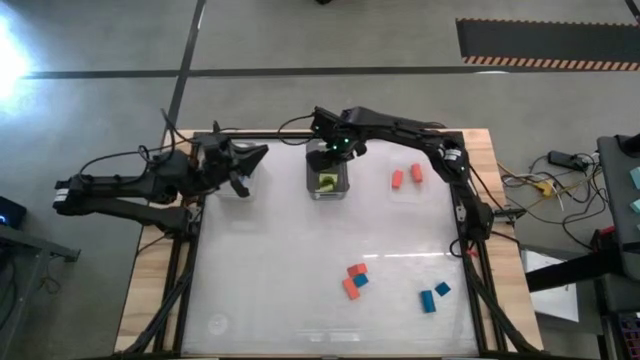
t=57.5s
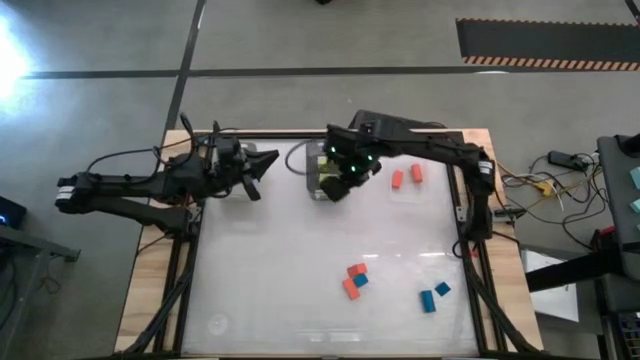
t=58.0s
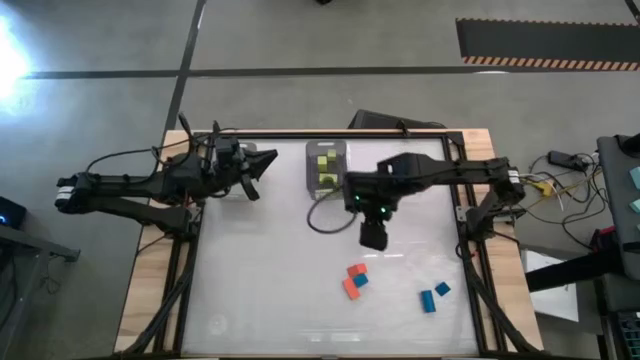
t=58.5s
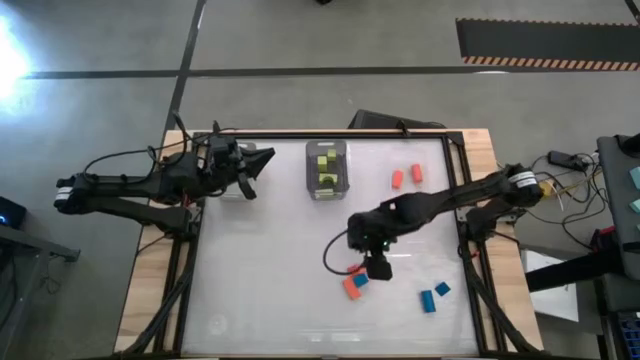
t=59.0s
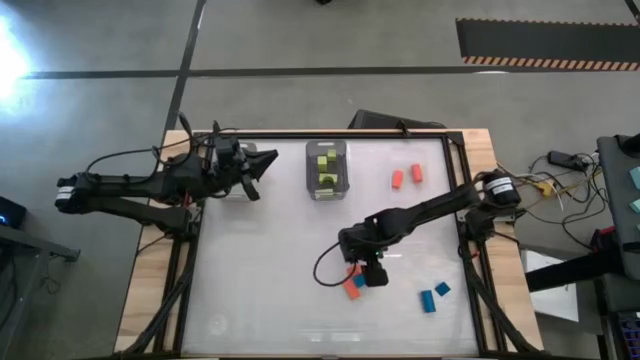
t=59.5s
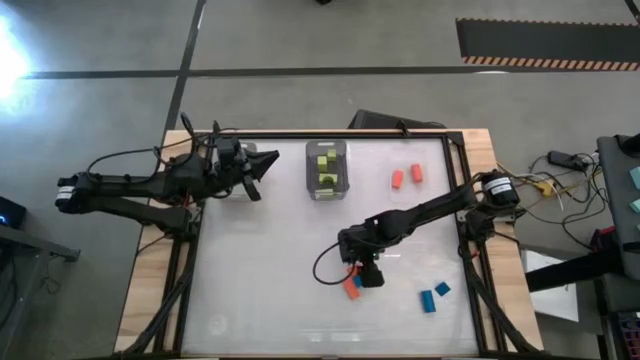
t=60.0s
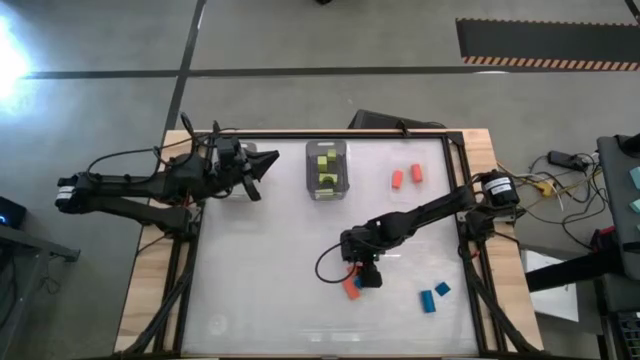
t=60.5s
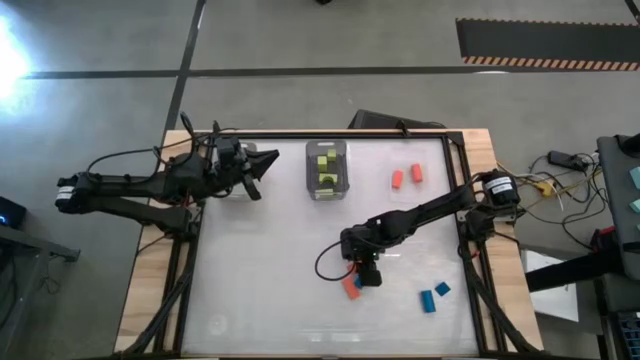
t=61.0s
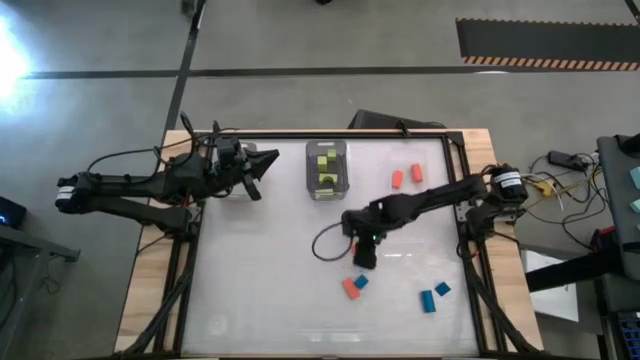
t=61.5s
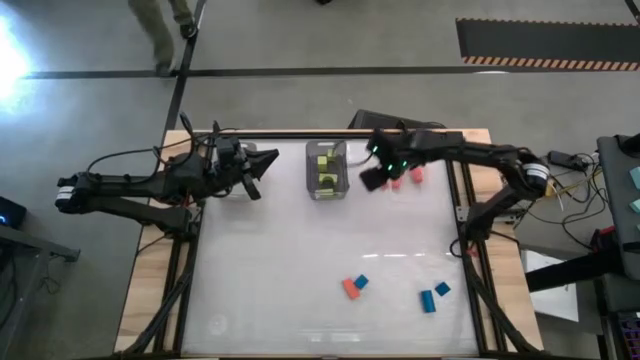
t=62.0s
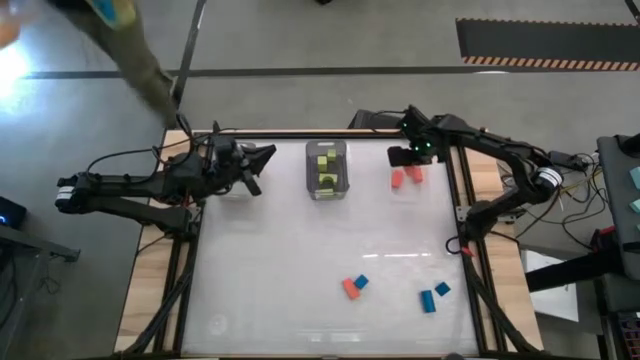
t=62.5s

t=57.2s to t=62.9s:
Task: Sort & place blocks by color
Put the orange block into the transparent bin

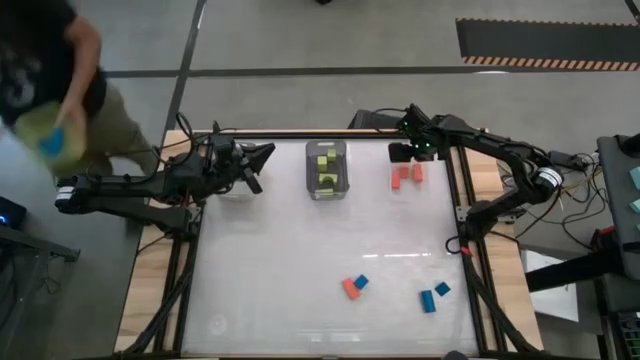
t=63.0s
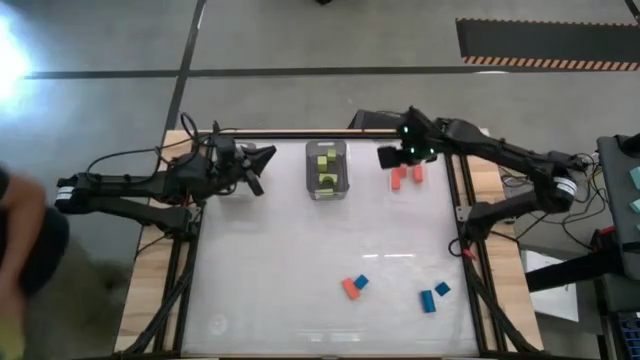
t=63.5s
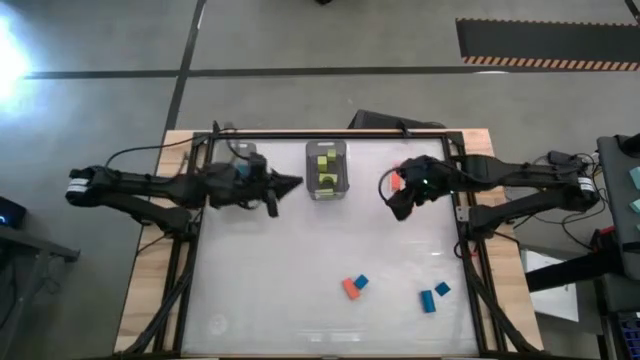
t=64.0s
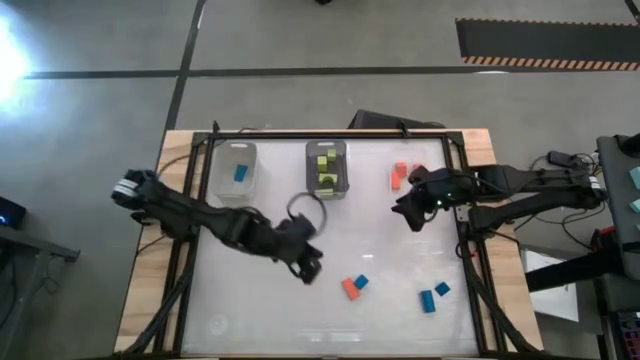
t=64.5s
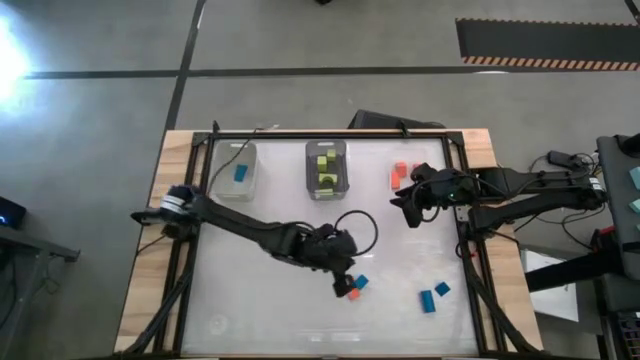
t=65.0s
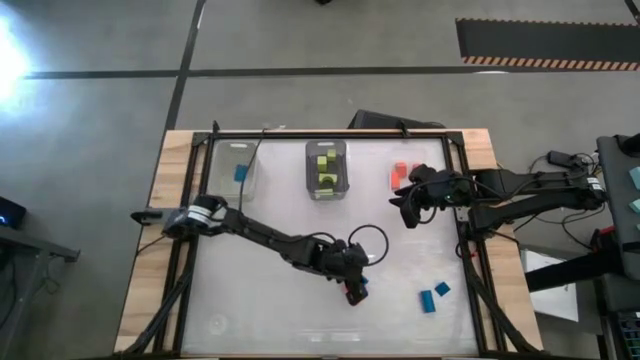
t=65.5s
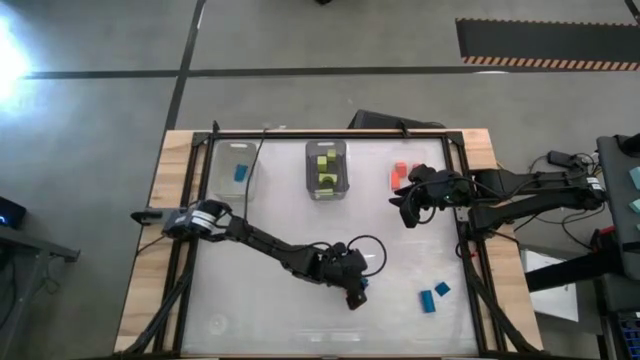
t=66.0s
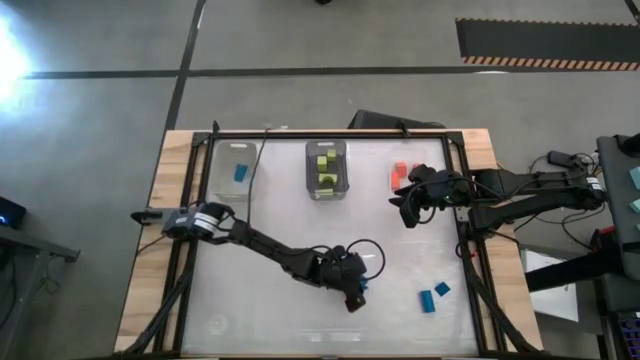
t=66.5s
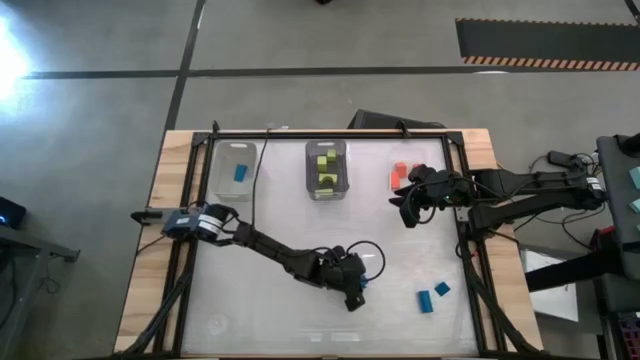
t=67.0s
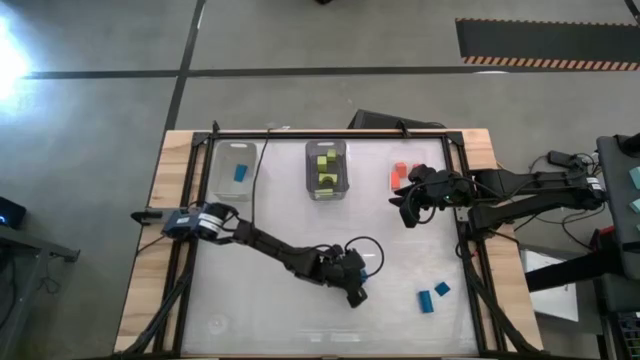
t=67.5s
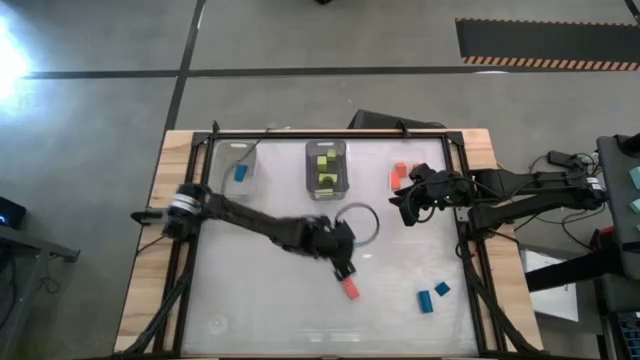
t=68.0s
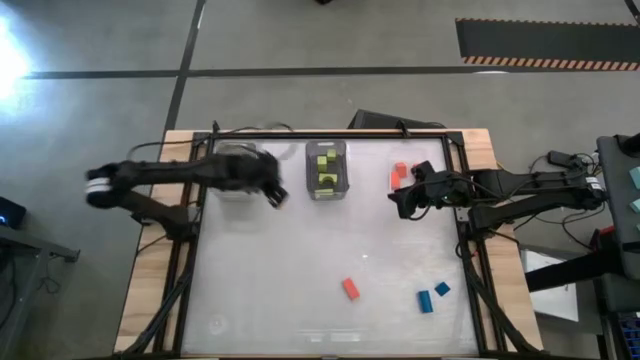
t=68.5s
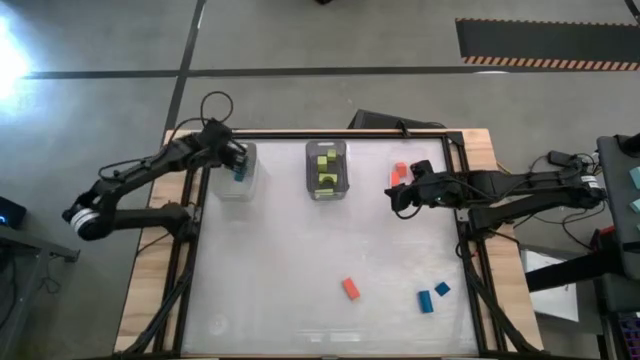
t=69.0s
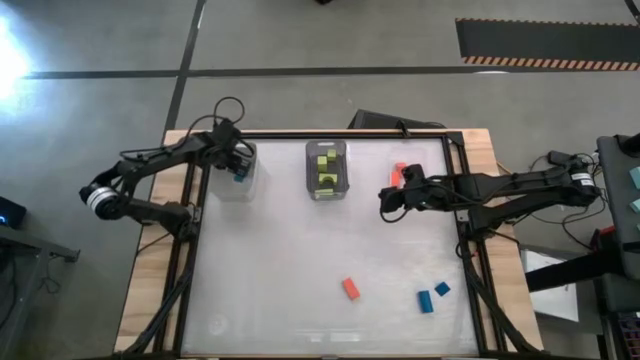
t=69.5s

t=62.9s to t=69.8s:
Put the blue block into the white bin

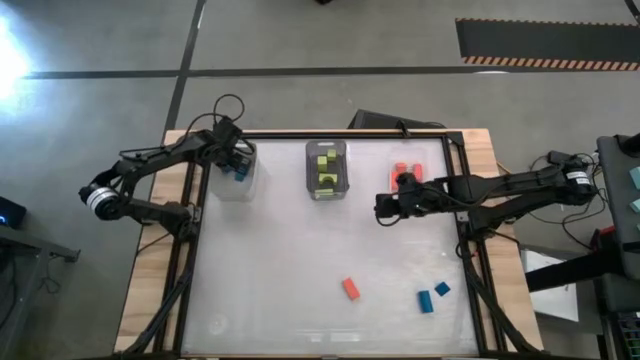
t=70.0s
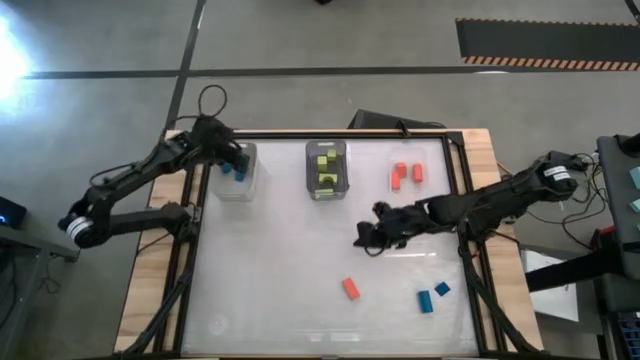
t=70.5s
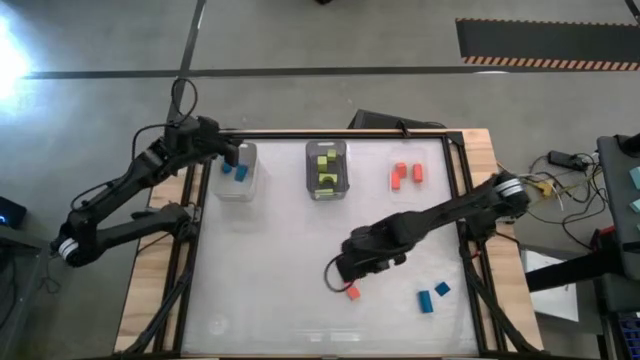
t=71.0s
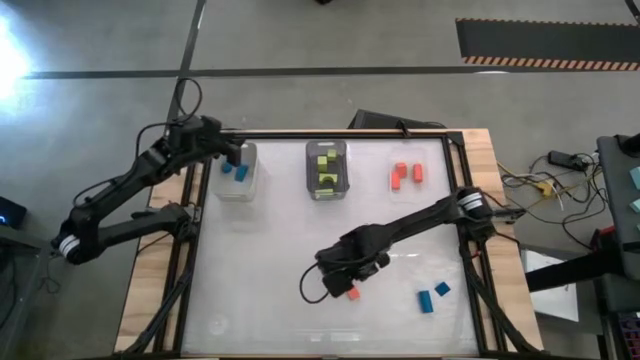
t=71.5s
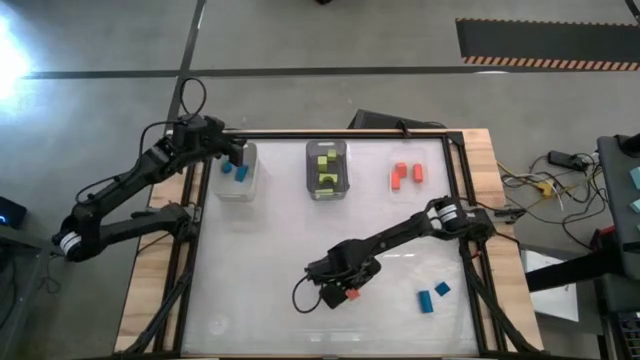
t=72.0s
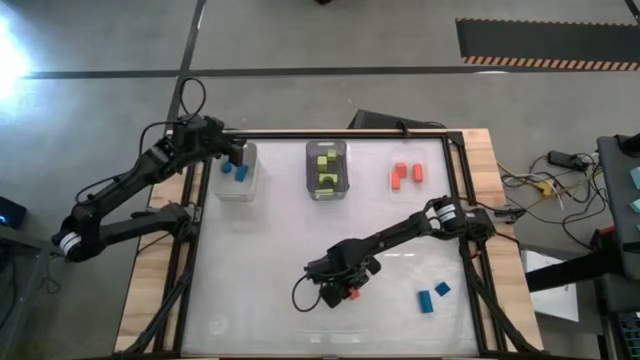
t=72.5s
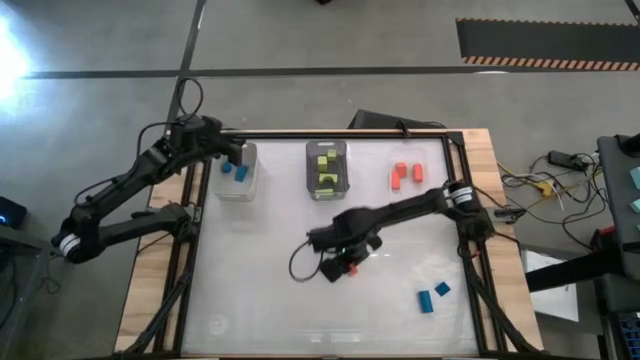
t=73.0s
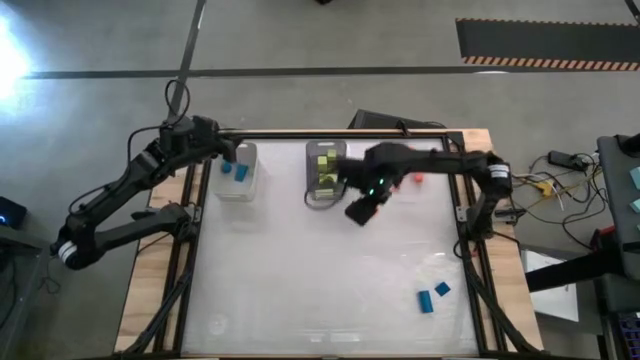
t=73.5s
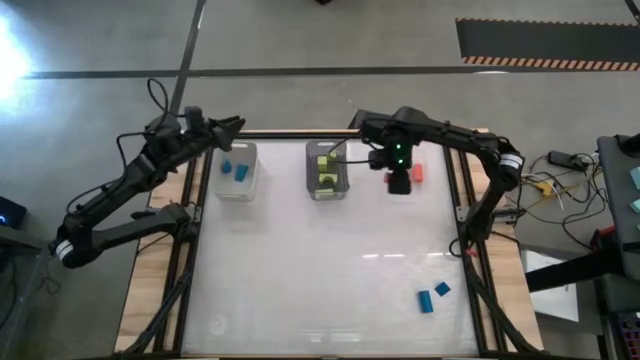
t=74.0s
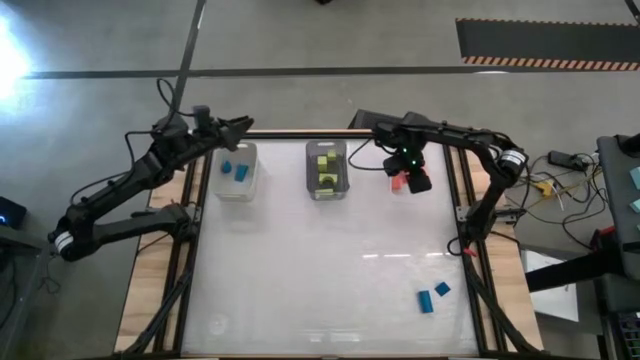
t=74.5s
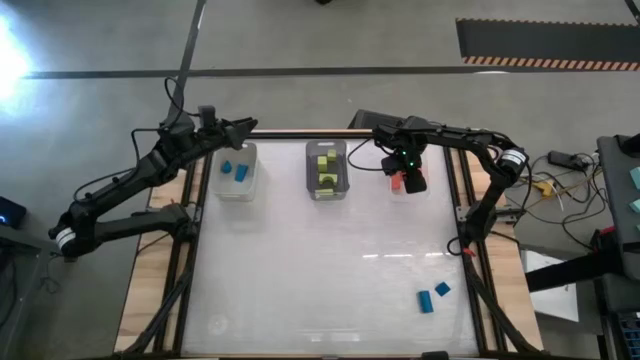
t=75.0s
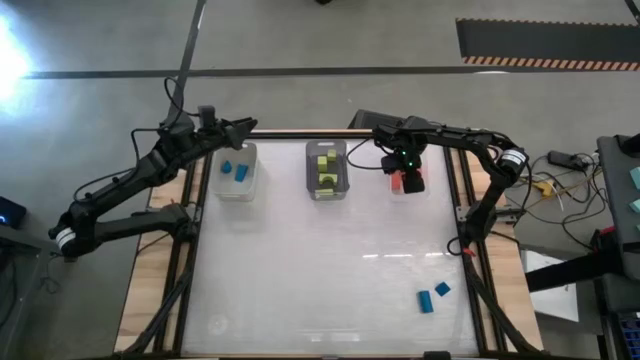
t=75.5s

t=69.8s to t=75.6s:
Put the orange block into the transparent bin

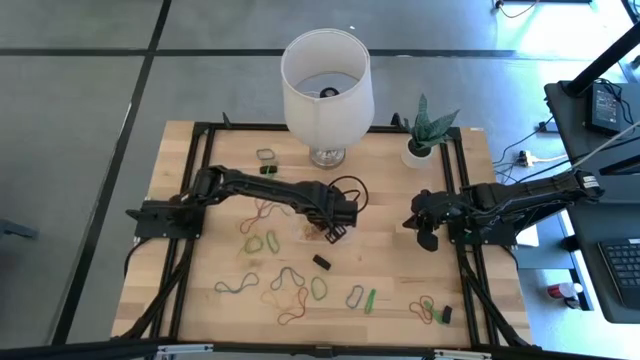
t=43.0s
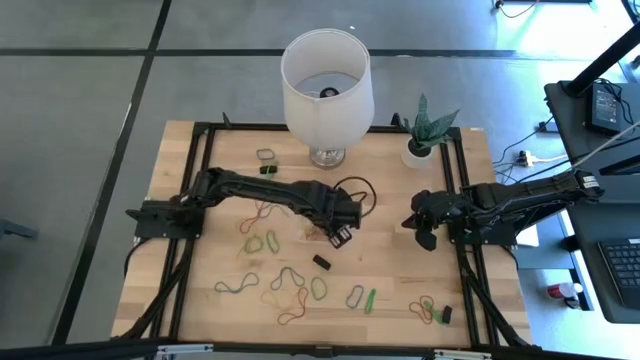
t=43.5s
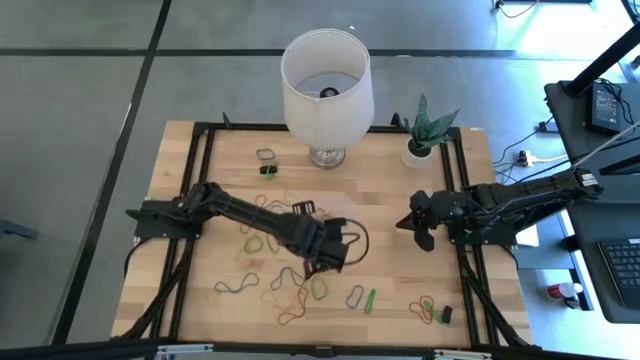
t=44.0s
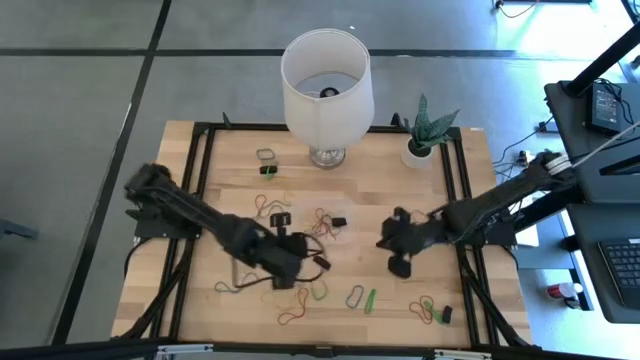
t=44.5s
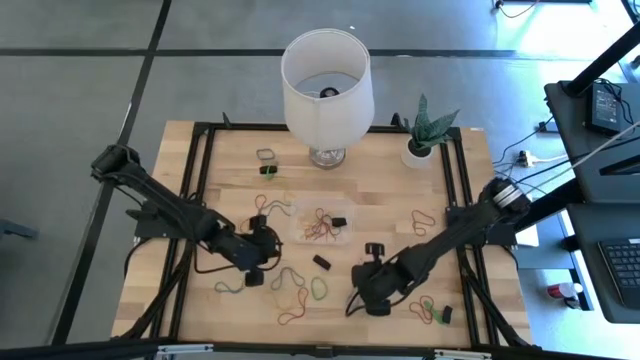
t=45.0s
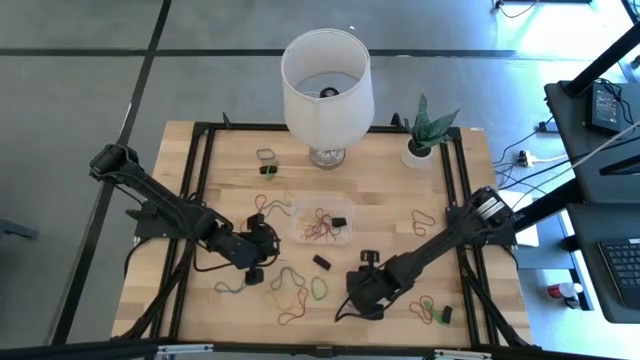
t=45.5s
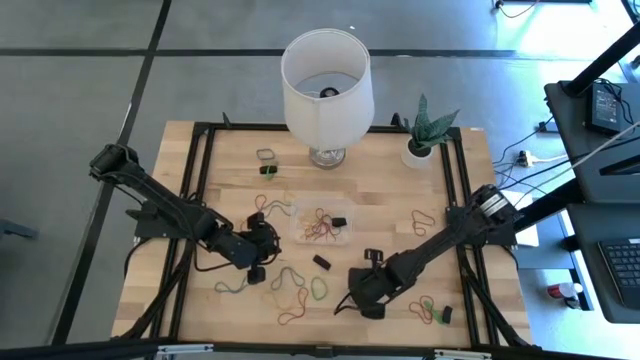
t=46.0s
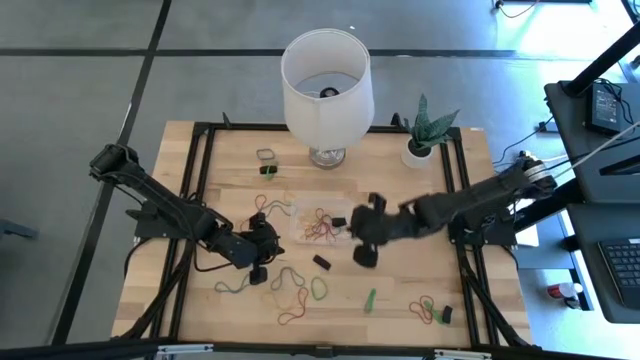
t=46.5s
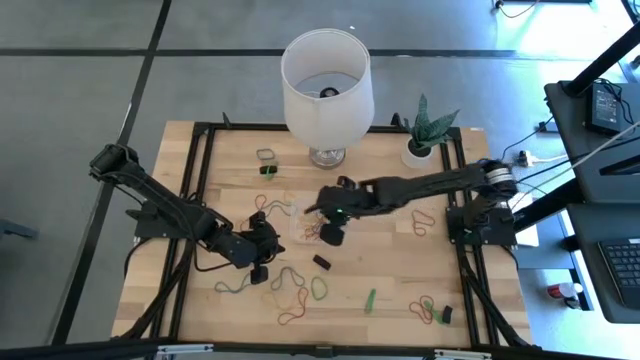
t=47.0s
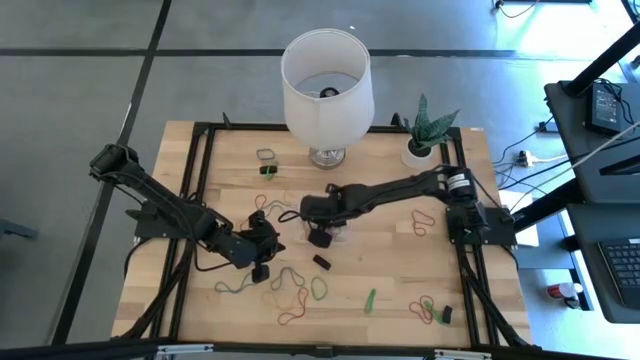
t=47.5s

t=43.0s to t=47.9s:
Task: Pick and place rubber bands into bin
Put the blue rubber band into the container
